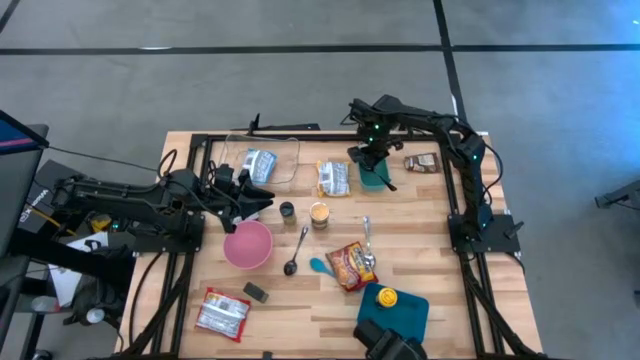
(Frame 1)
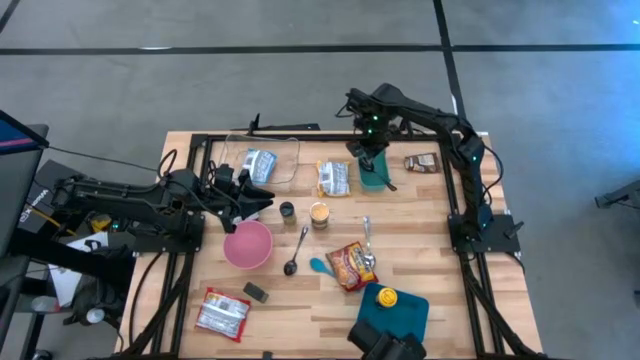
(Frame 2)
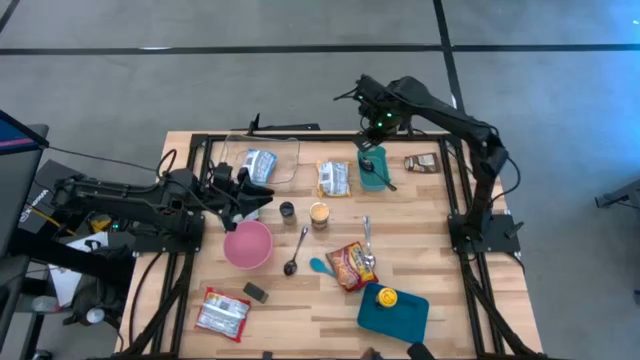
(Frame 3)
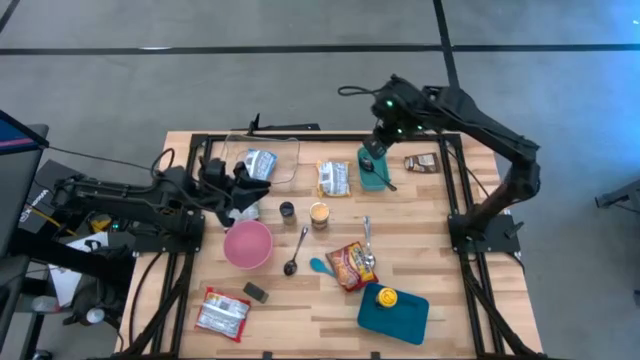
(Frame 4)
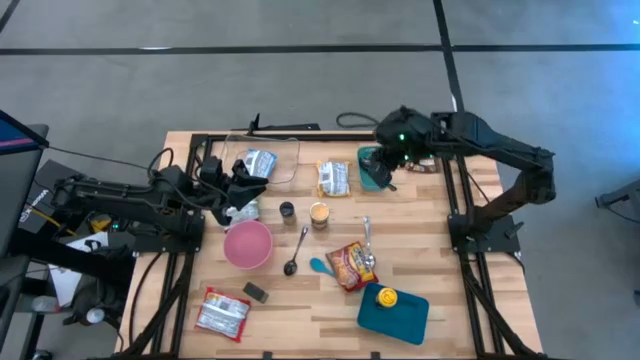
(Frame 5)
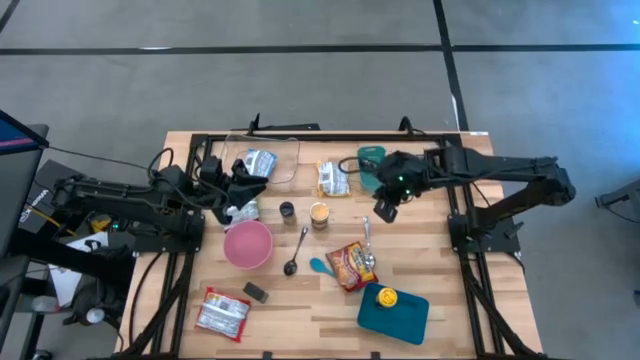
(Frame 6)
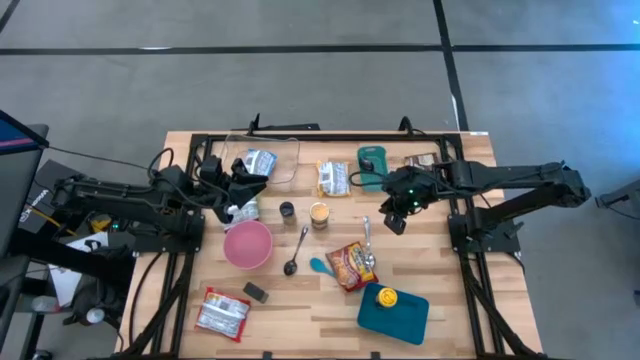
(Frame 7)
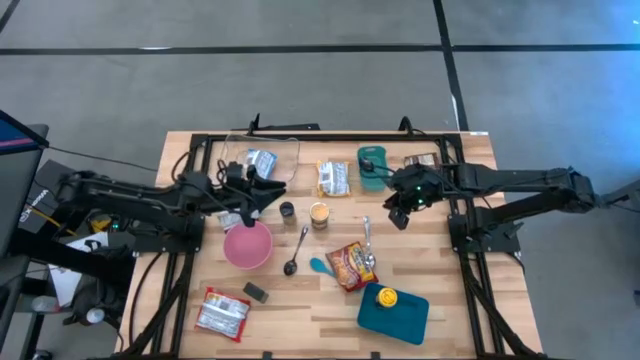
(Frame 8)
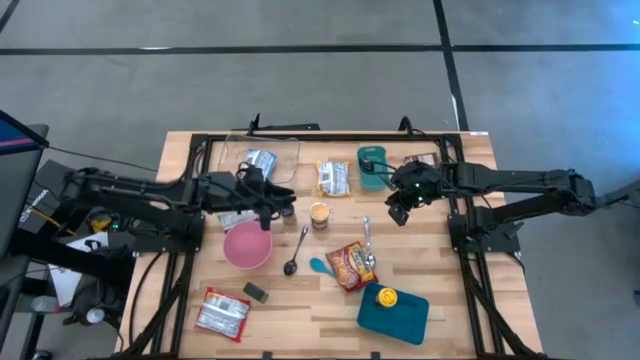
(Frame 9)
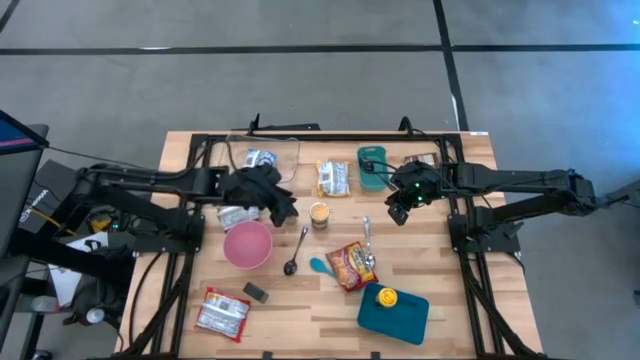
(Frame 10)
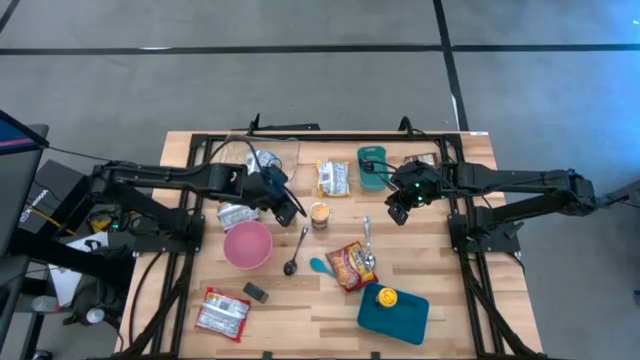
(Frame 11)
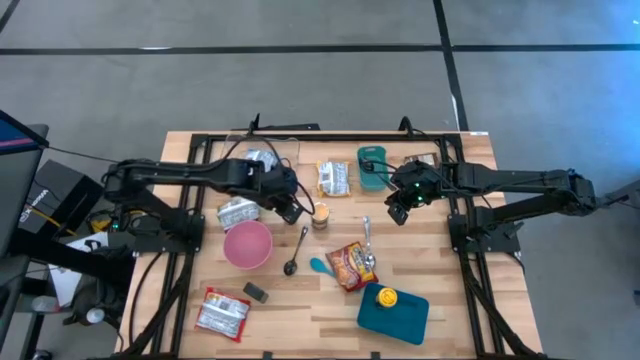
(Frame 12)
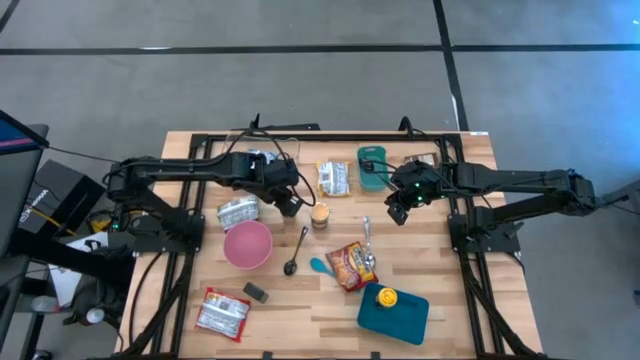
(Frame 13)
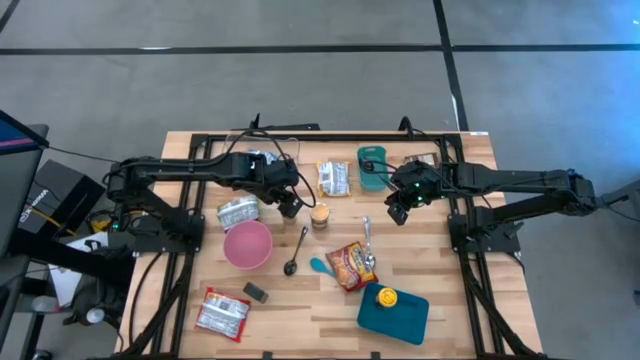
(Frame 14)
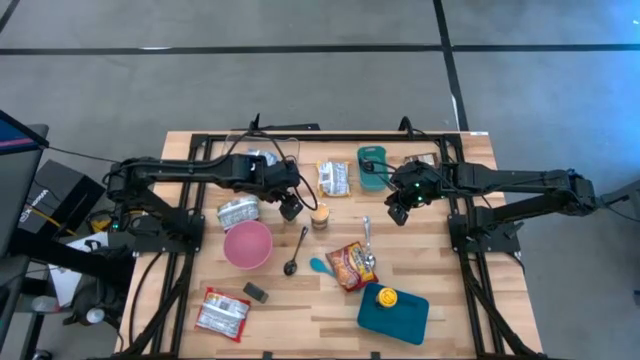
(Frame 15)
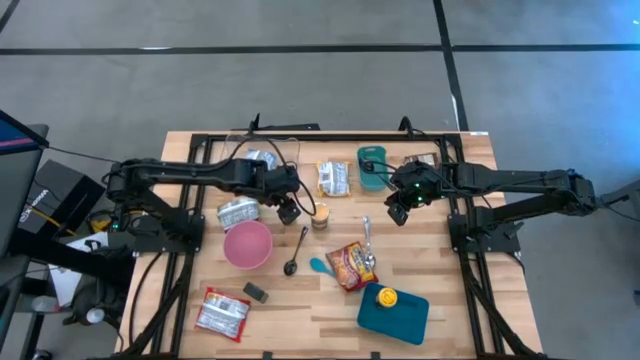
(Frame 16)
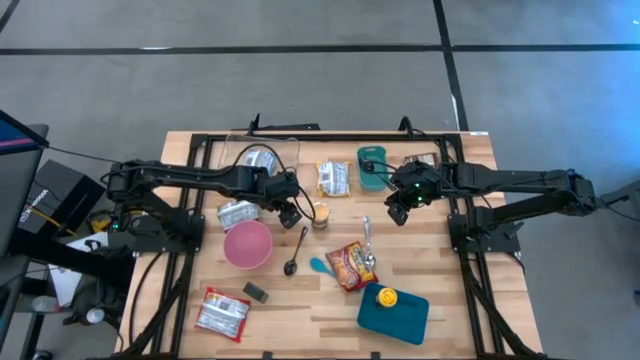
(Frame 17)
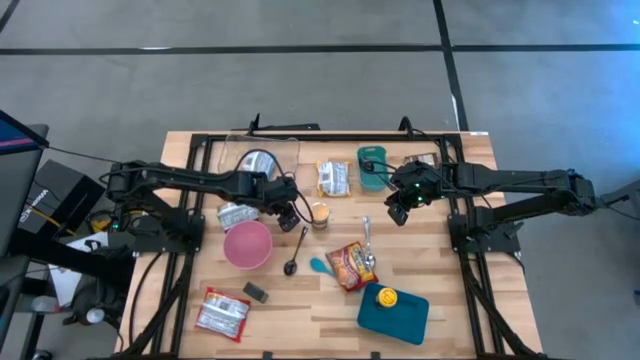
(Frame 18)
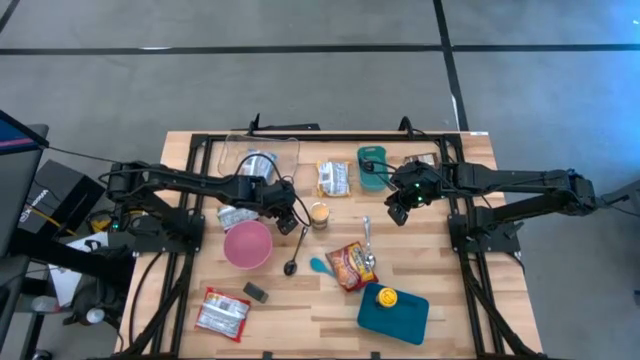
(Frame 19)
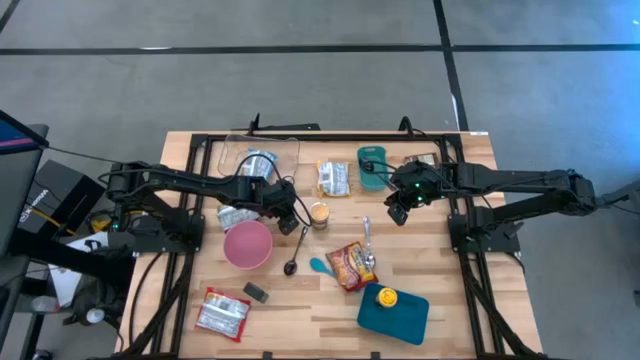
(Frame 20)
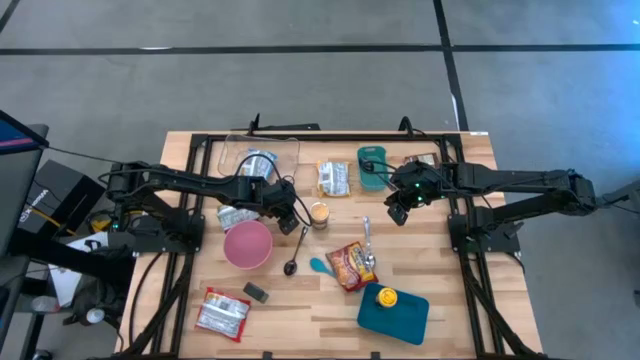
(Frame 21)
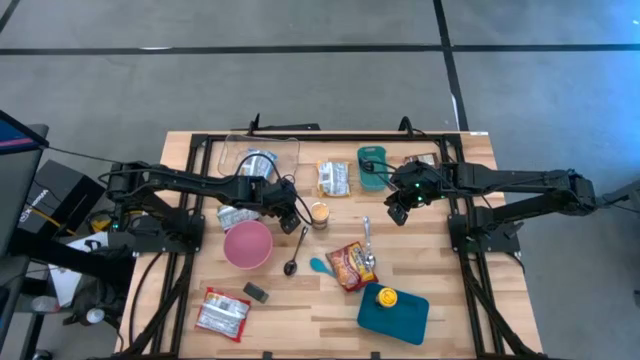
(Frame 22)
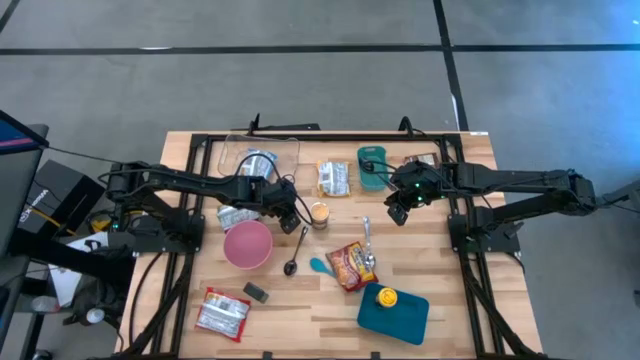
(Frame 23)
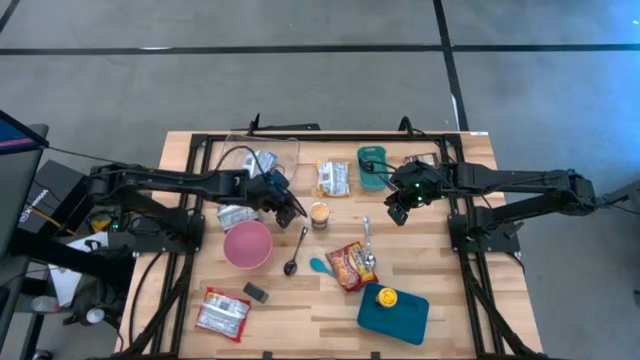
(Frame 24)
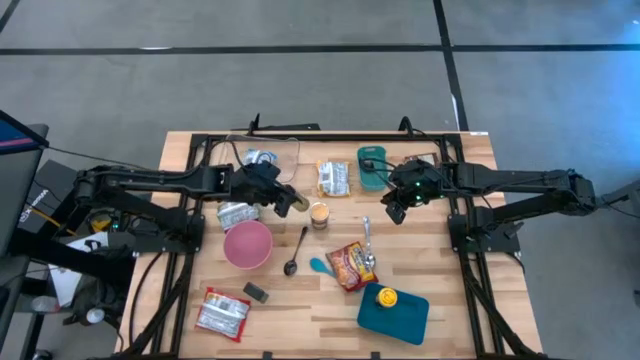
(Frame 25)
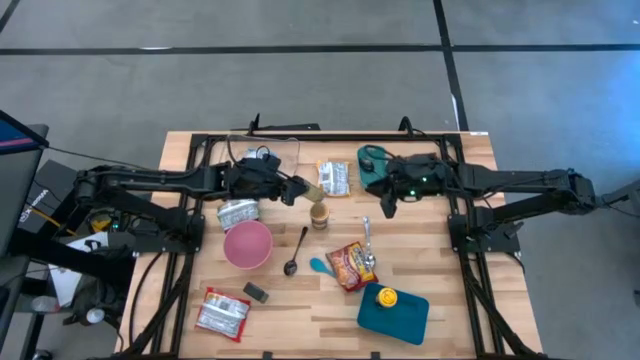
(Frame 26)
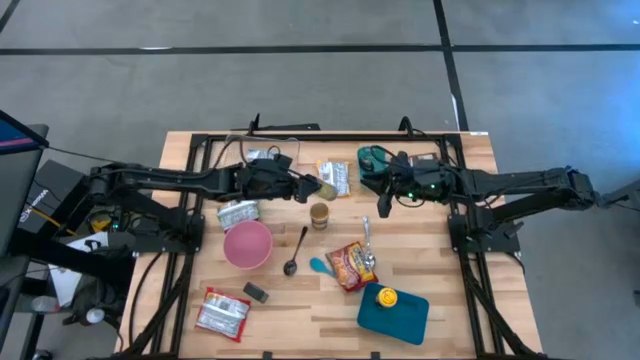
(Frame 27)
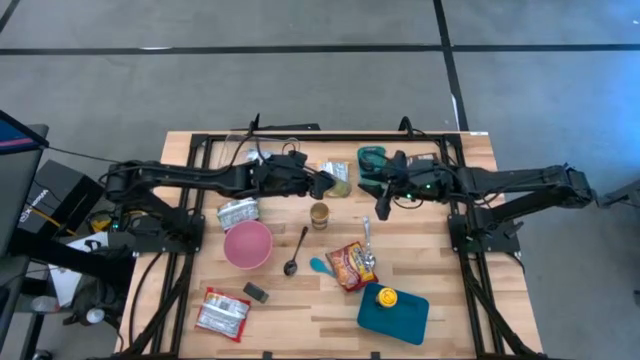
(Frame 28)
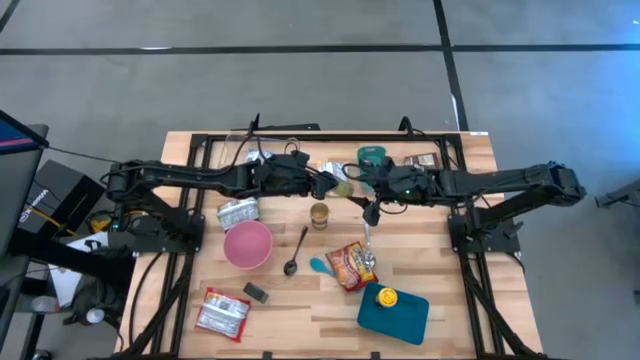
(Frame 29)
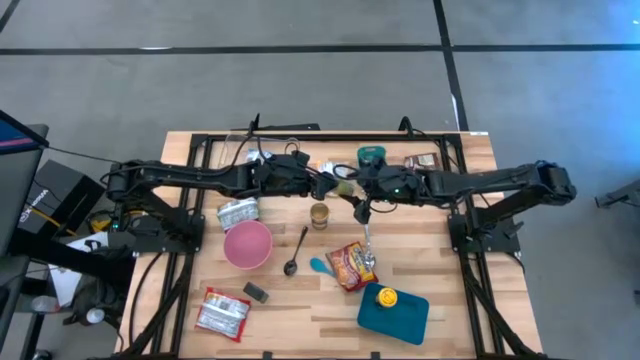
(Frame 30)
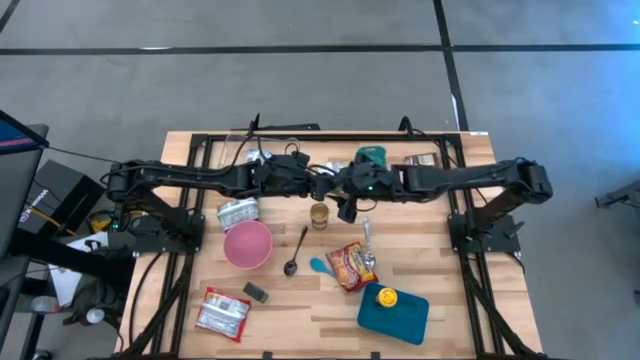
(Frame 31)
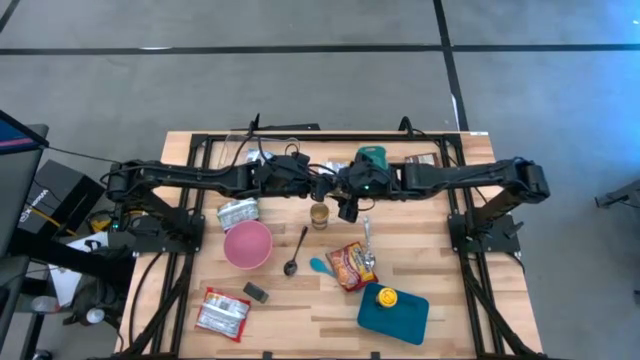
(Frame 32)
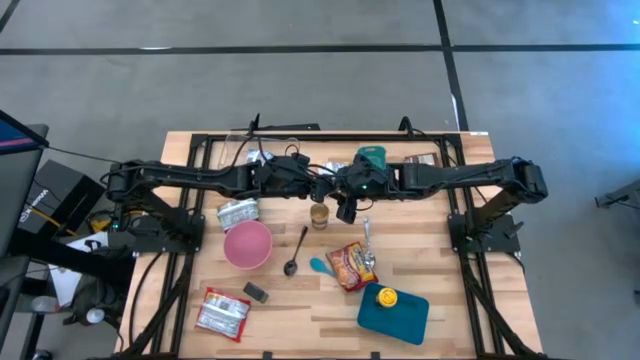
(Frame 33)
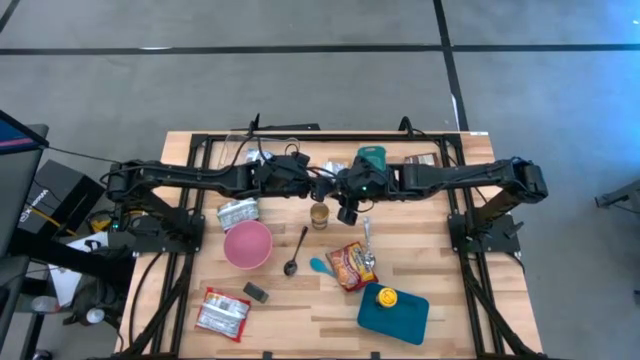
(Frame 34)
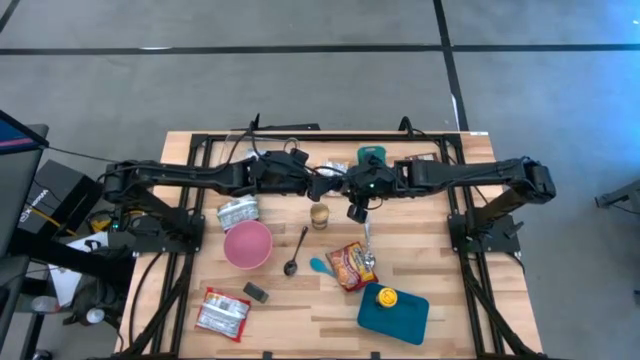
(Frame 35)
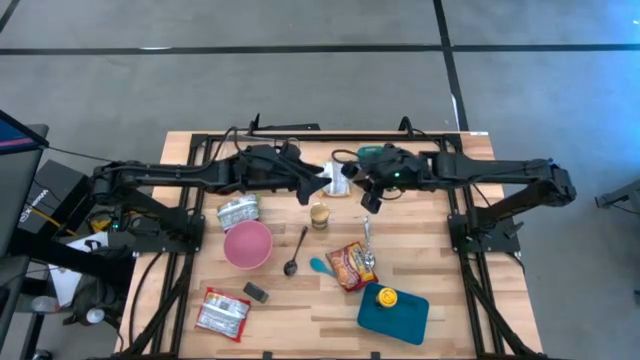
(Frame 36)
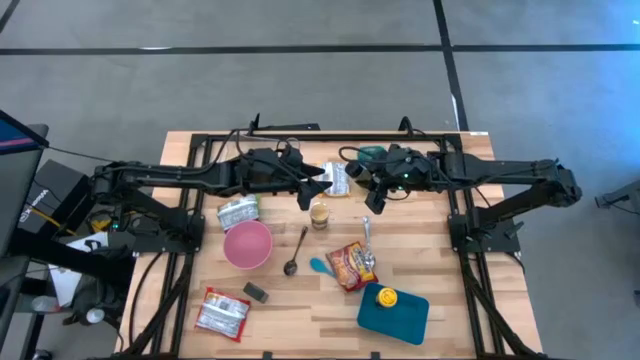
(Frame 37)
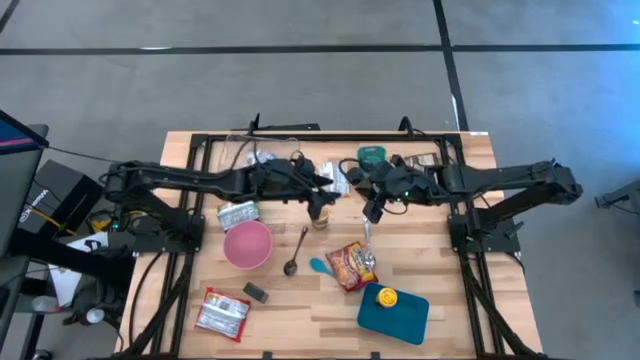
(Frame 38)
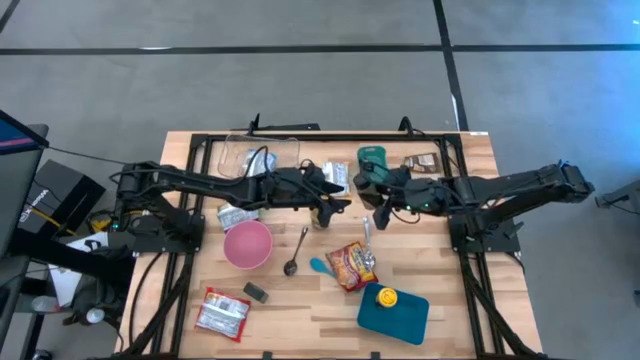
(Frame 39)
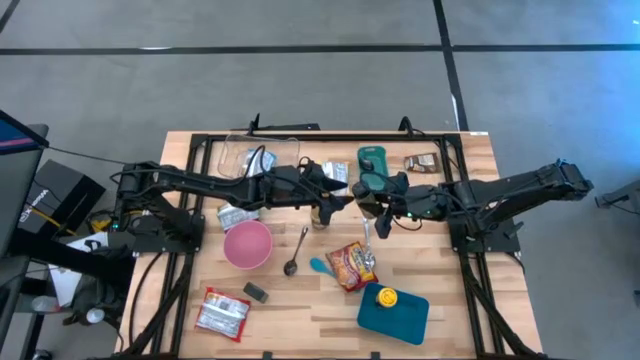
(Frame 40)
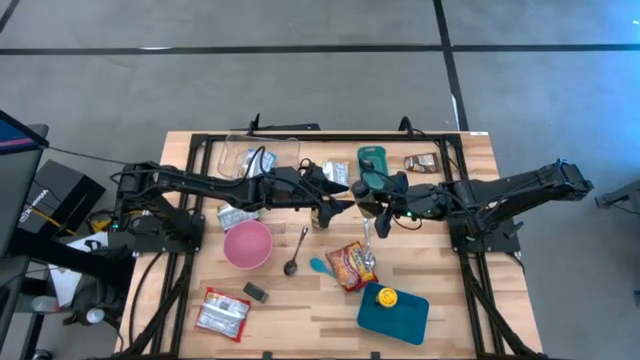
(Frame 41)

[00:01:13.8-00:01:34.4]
Task: Pick & Place Food Item
Put the black seasoning bottle into the blue bin
